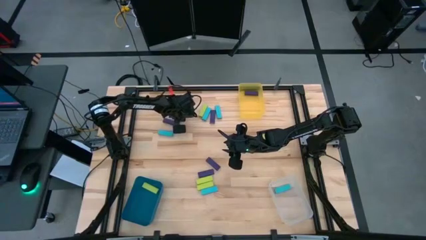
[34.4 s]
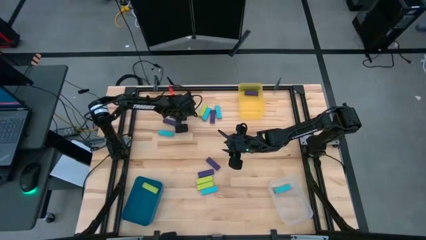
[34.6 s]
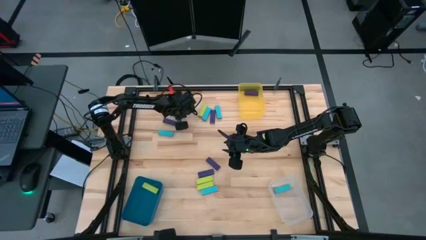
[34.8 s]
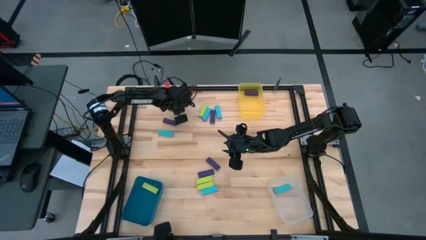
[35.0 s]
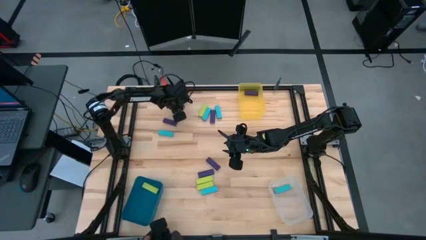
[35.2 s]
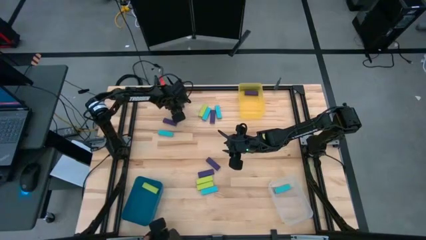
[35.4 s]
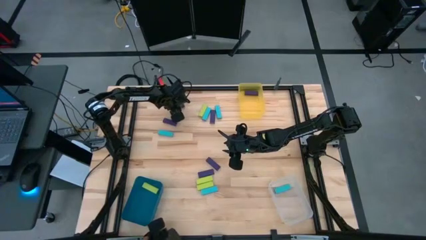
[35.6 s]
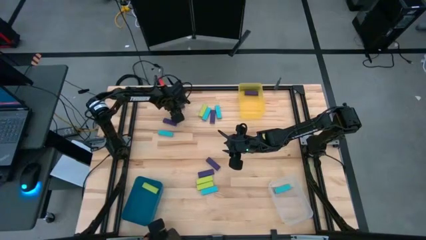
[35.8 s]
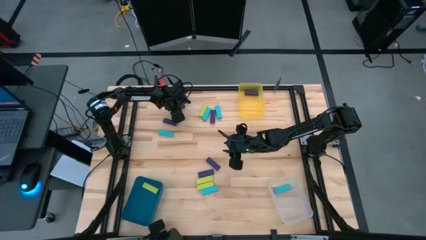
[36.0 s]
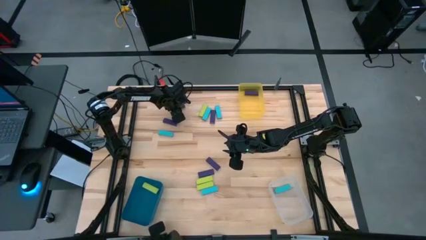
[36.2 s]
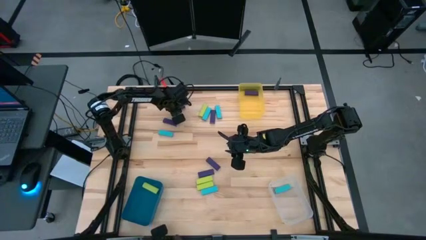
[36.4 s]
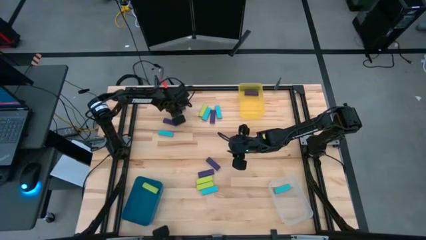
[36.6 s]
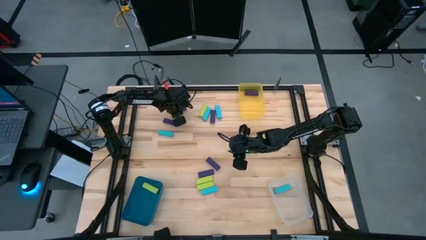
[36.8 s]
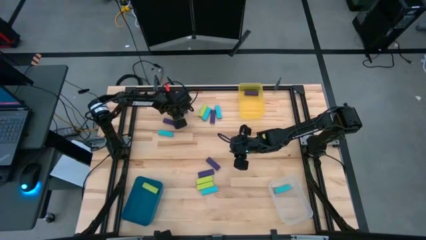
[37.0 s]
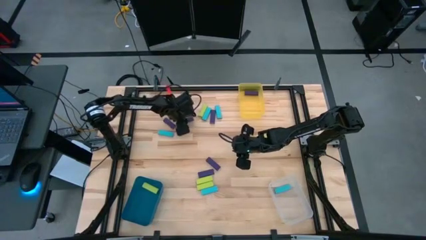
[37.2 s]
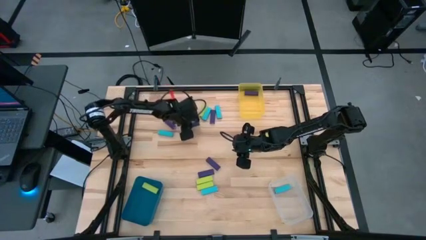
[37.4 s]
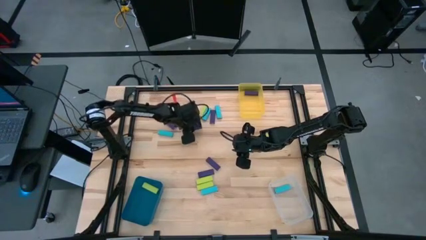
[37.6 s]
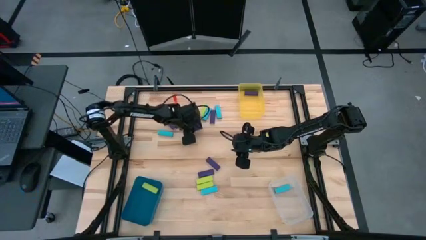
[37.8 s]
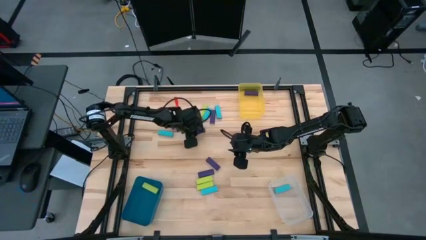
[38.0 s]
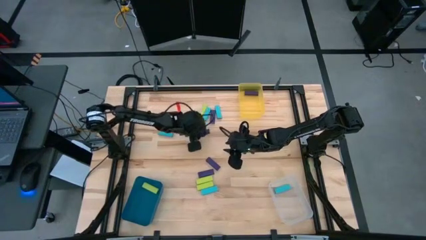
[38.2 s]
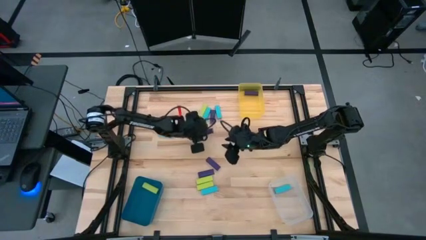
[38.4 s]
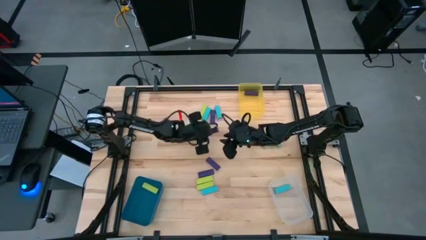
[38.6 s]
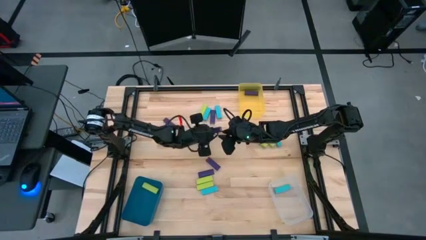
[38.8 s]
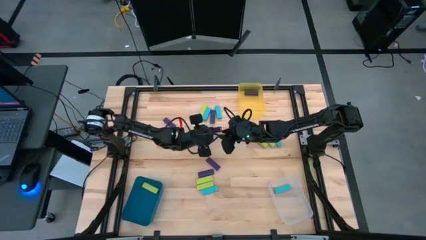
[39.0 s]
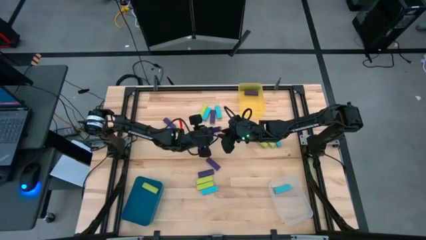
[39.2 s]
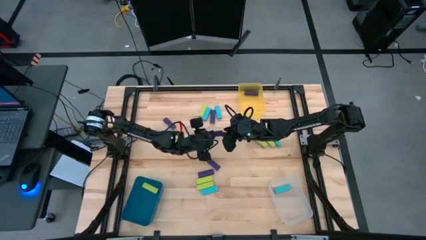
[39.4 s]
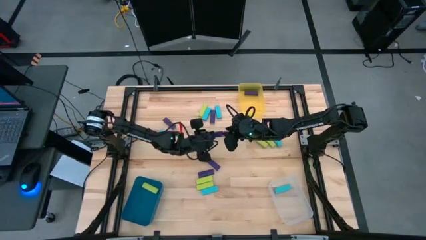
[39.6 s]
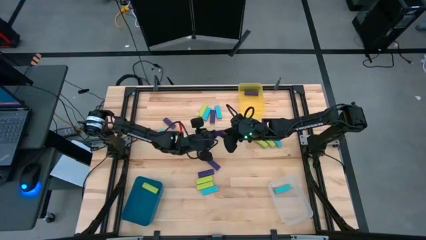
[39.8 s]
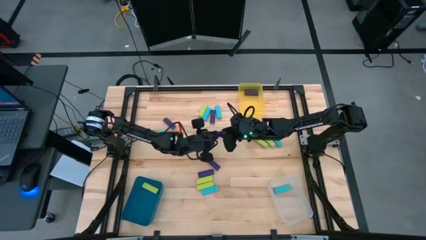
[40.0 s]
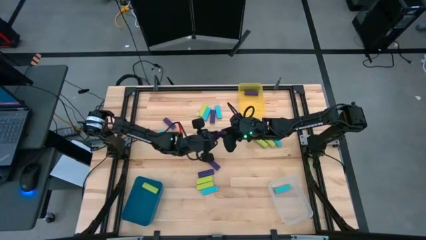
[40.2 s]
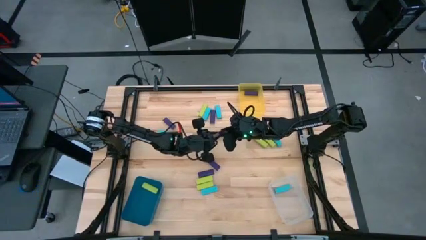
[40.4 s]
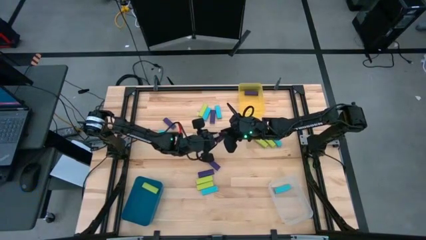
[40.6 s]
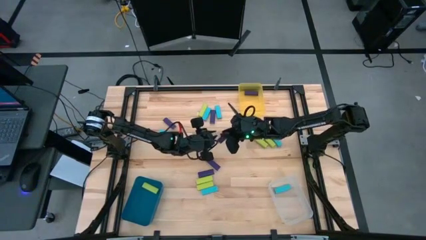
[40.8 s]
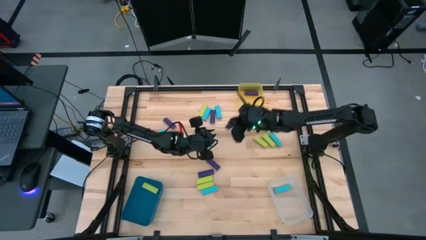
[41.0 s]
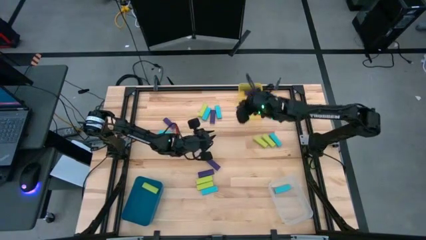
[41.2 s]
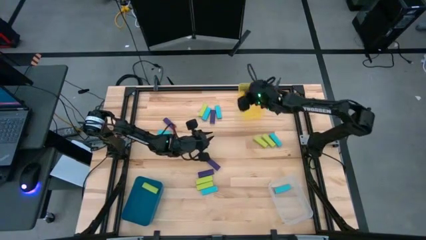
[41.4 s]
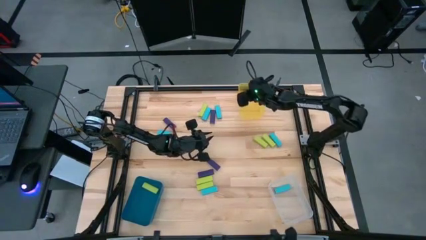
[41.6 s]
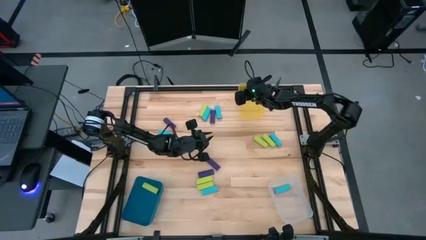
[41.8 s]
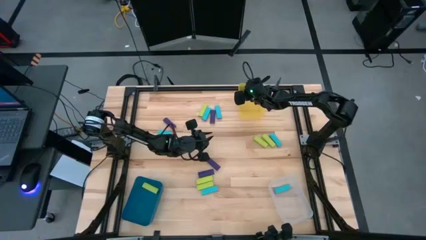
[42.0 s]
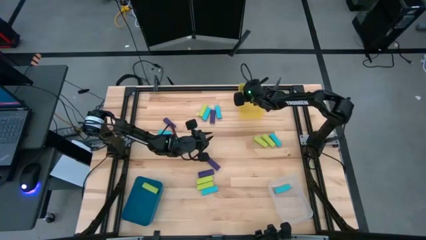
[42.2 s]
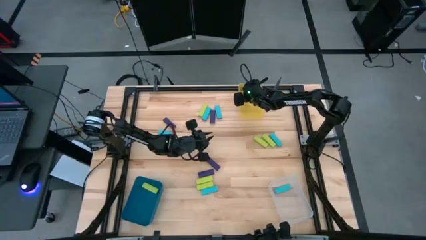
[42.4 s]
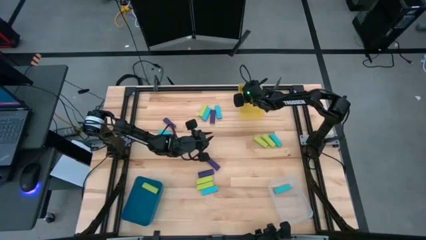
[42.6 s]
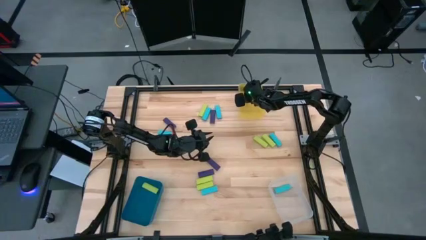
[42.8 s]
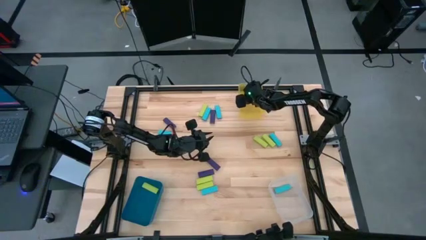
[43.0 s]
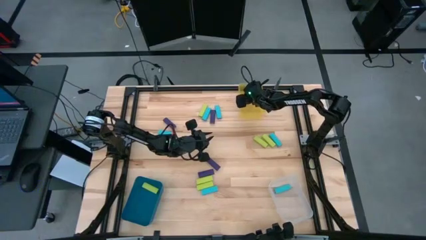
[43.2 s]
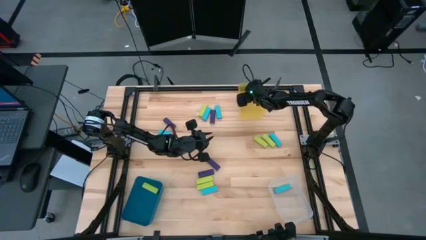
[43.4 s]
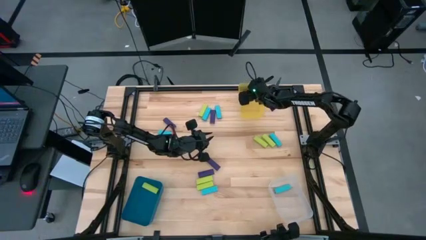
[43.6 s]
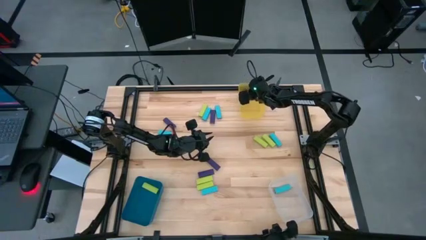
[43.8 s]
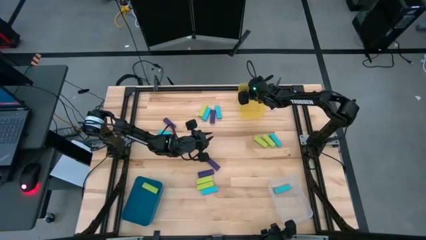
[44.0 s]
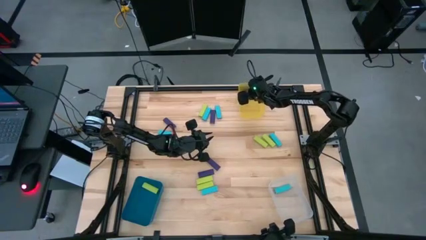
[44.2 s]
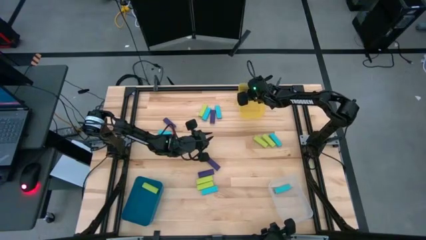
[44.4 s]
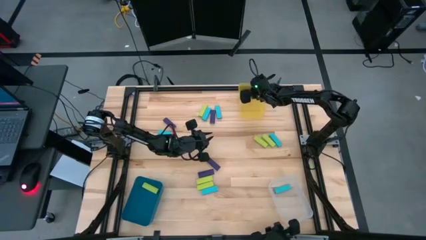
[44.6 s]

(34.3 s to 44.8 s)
Task: Sort blocks
Put the violet block into the transparent yellow bin

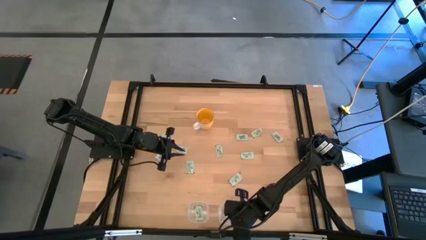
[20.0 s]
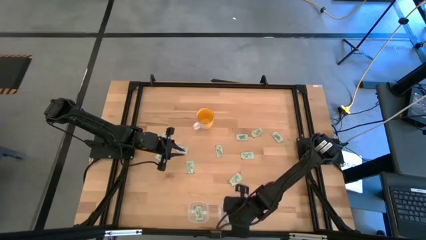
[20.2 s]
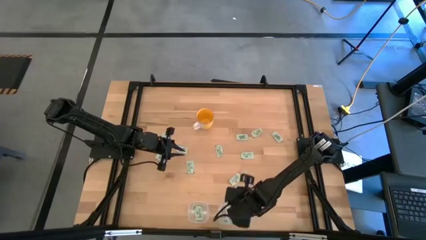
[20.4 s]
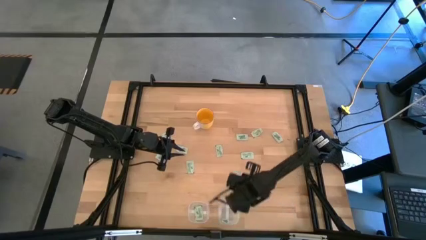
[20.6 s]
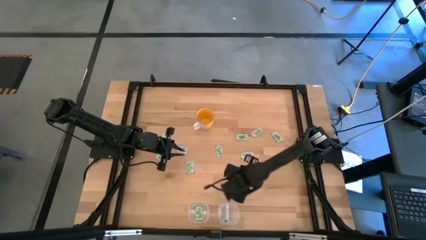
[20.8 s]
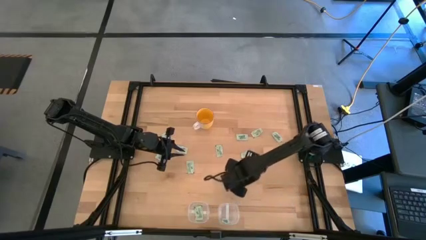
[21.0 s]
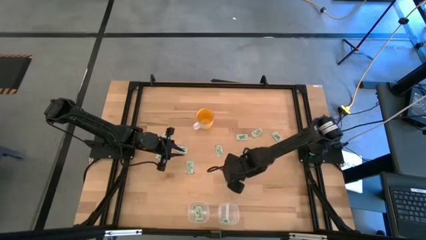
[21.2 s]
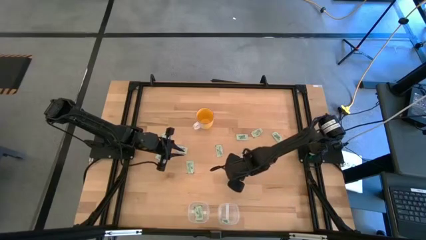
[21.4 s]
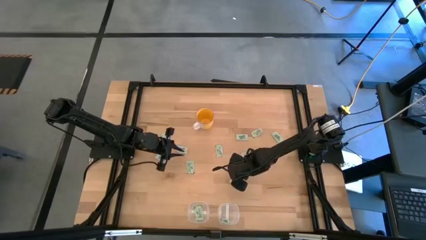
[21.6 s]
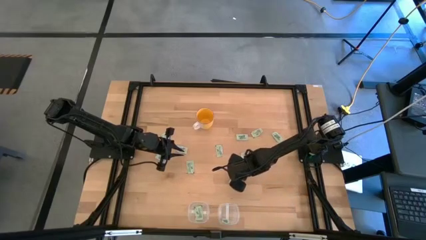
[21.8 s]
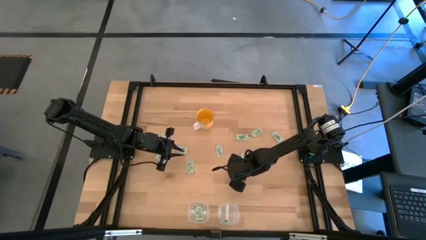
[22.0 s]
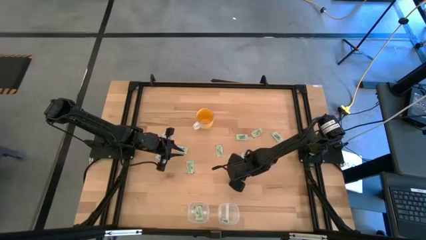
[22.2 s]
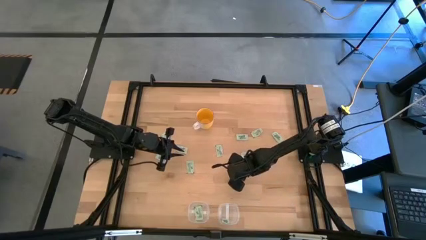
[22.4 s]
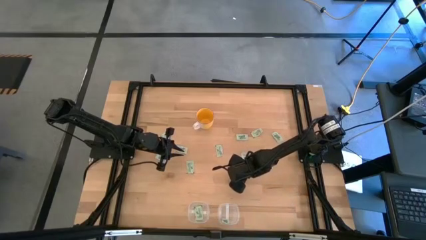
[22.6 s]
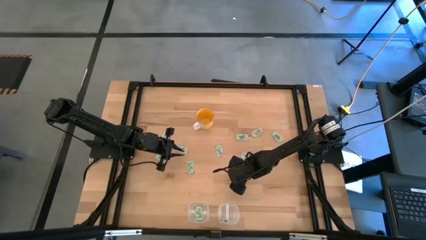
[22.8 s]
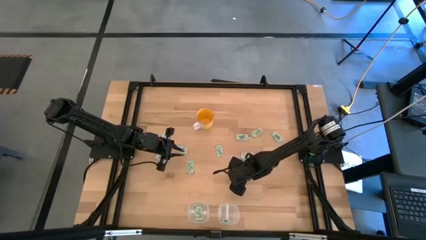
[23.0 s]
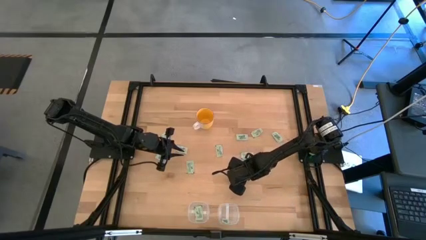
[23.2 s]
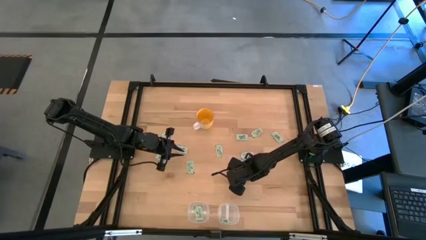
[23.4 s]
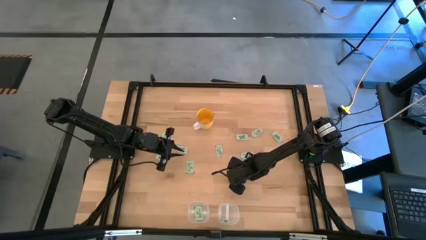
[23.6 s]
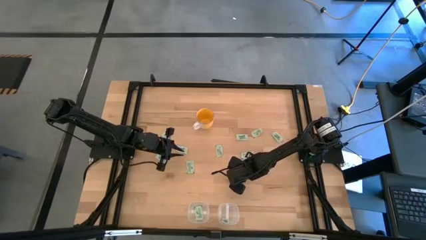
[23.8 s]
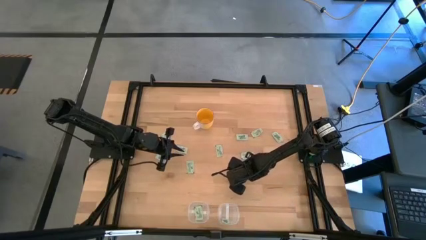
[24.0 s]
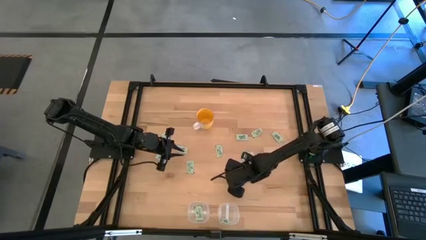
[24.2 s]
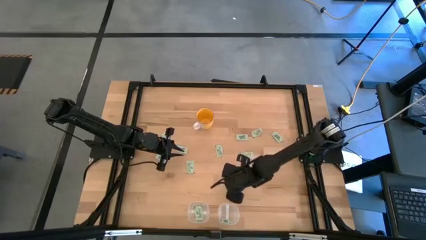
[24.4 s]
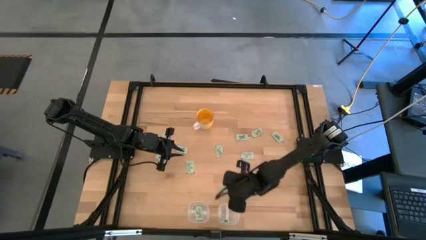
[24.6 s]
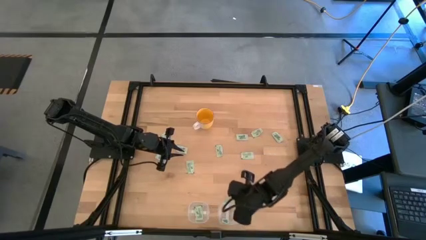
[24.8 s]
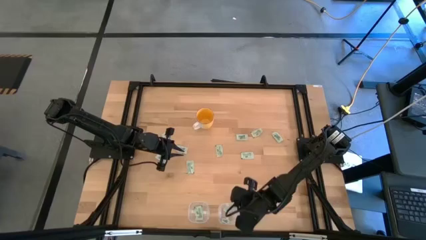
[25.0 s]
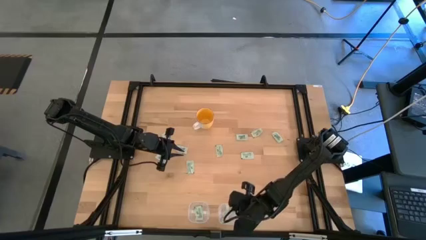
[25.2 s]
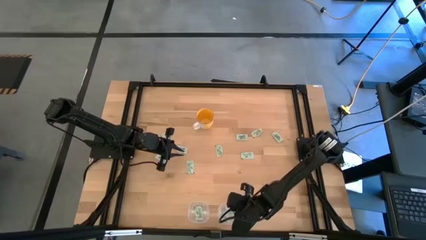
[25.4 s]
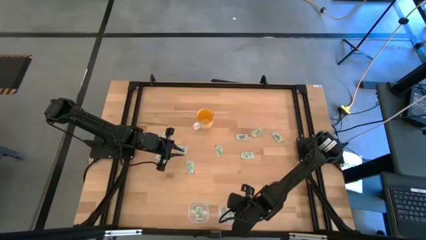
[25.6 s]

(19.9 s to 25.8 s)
Task: Pick and place items into bin
Put the green stevia packet into the right transparent bin
